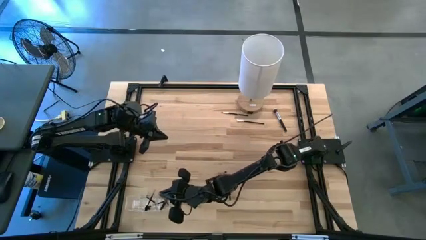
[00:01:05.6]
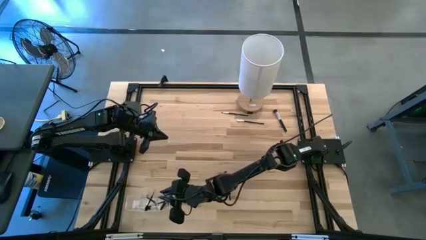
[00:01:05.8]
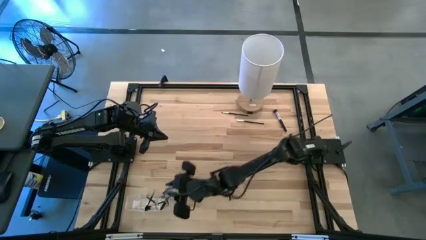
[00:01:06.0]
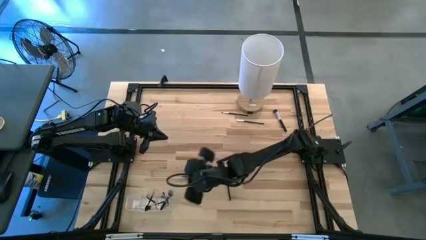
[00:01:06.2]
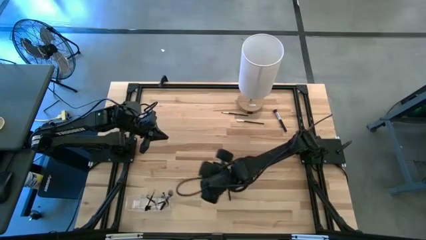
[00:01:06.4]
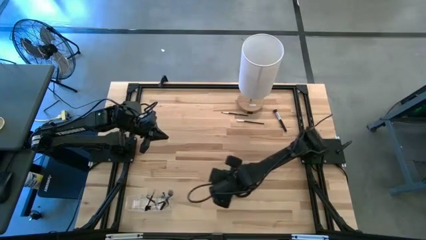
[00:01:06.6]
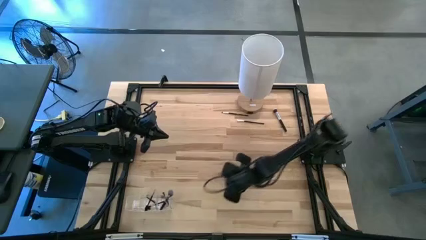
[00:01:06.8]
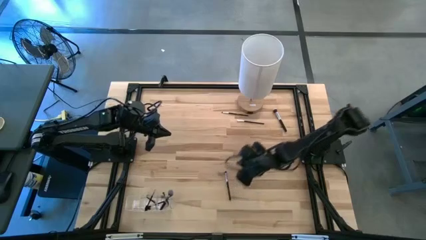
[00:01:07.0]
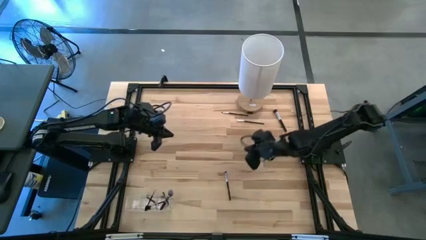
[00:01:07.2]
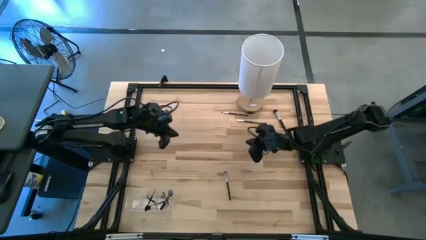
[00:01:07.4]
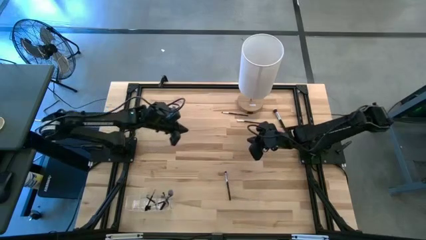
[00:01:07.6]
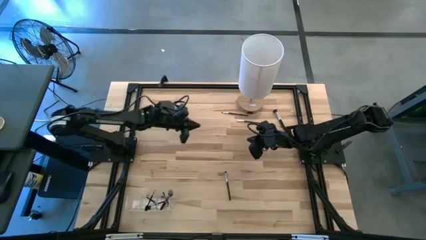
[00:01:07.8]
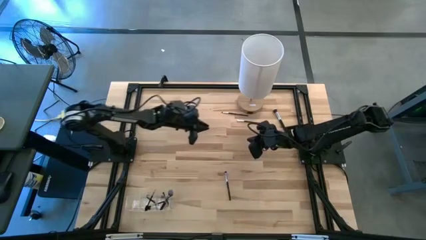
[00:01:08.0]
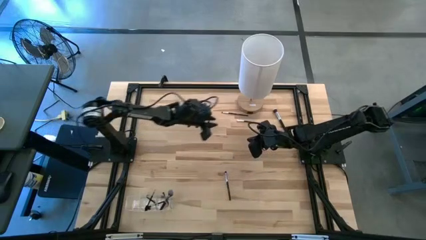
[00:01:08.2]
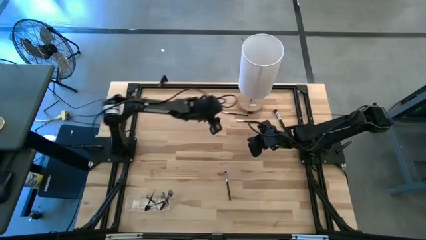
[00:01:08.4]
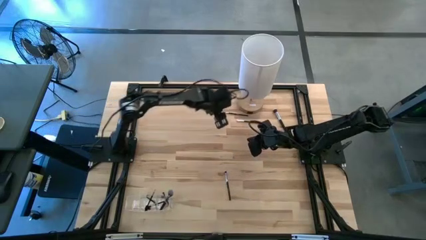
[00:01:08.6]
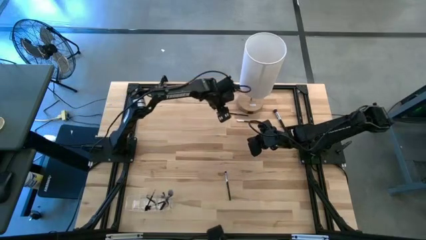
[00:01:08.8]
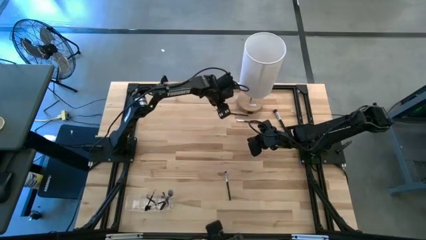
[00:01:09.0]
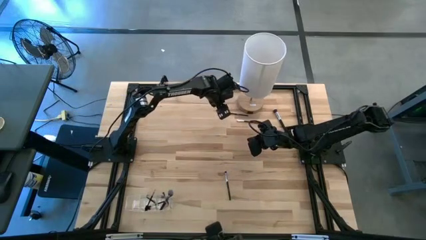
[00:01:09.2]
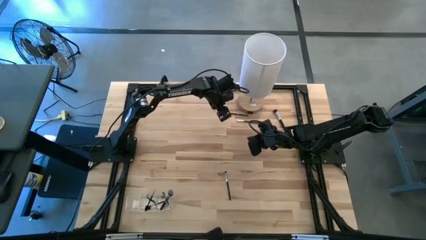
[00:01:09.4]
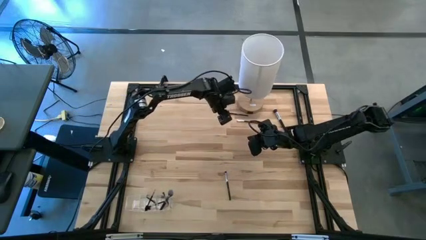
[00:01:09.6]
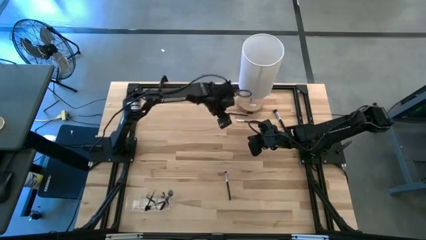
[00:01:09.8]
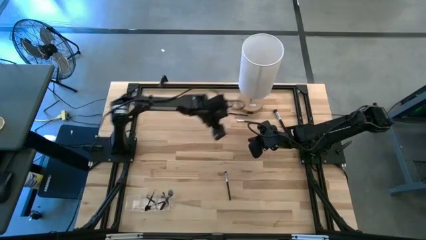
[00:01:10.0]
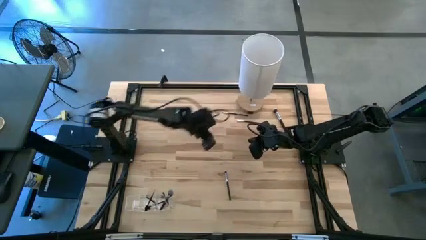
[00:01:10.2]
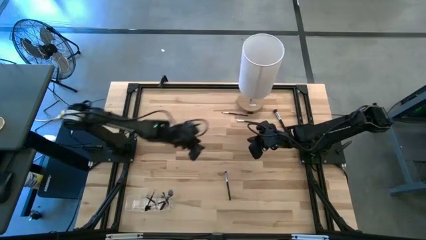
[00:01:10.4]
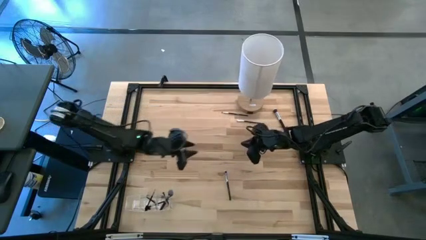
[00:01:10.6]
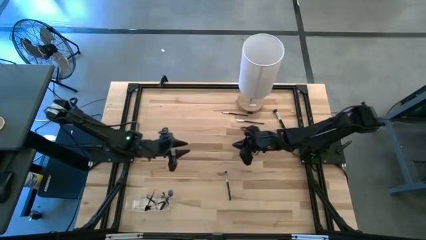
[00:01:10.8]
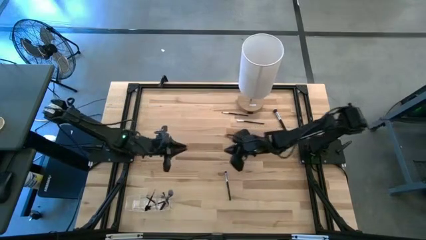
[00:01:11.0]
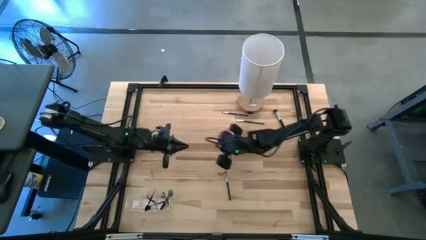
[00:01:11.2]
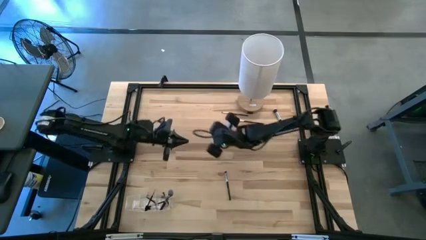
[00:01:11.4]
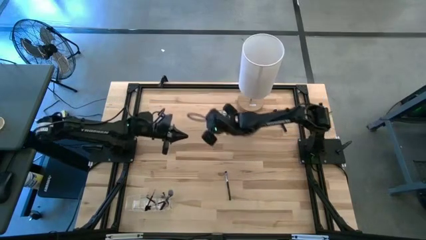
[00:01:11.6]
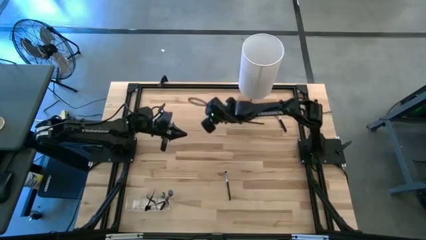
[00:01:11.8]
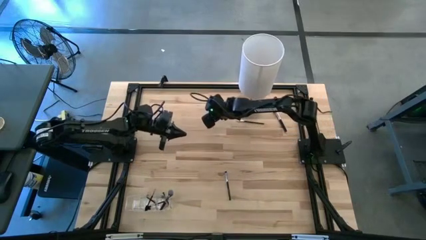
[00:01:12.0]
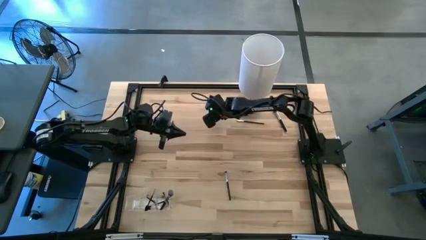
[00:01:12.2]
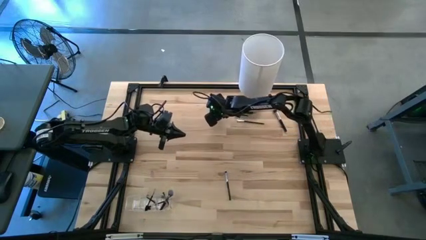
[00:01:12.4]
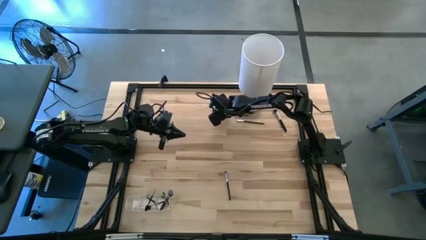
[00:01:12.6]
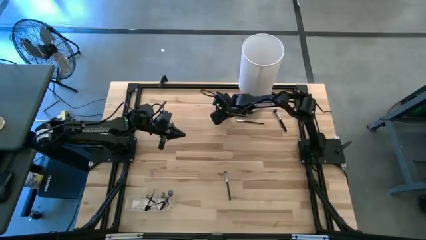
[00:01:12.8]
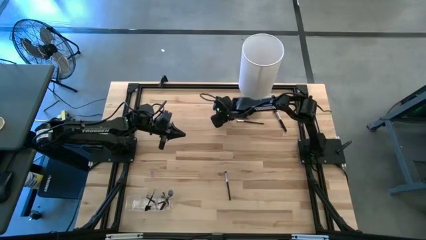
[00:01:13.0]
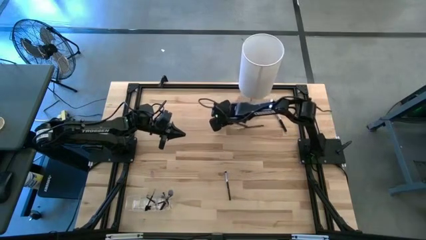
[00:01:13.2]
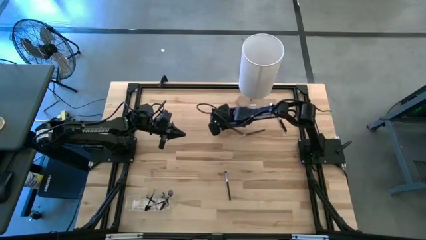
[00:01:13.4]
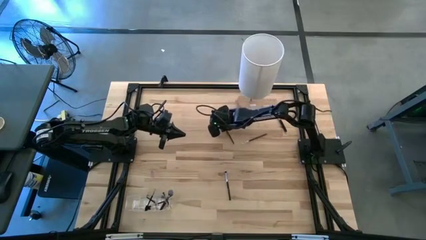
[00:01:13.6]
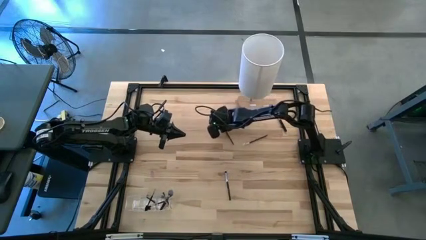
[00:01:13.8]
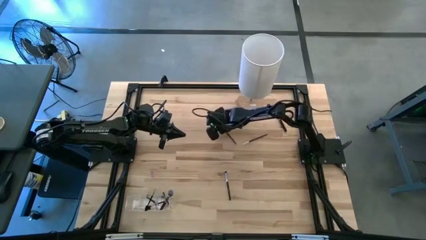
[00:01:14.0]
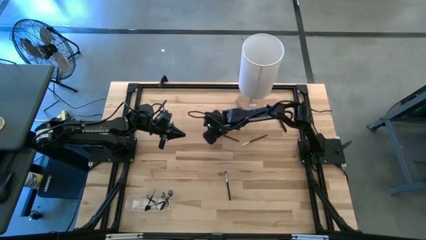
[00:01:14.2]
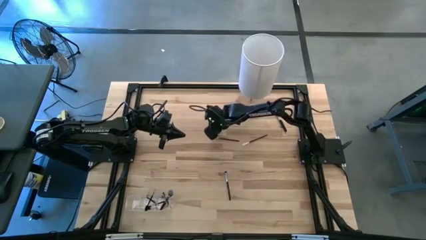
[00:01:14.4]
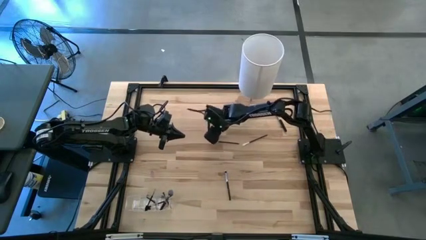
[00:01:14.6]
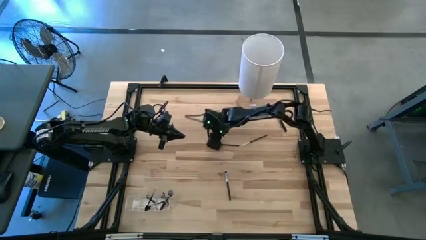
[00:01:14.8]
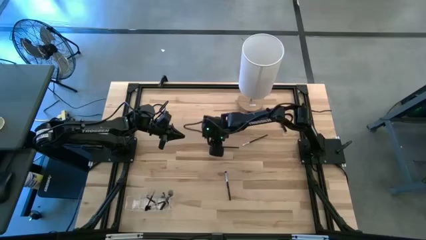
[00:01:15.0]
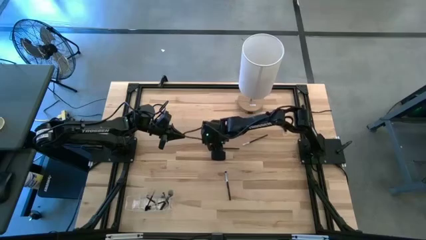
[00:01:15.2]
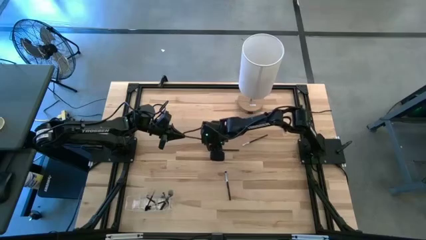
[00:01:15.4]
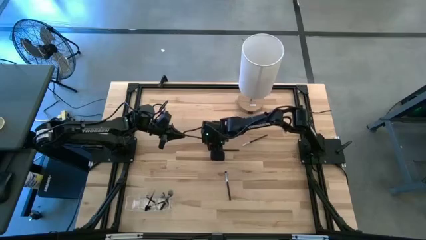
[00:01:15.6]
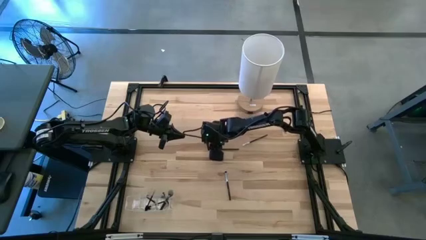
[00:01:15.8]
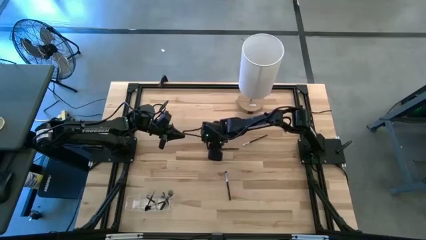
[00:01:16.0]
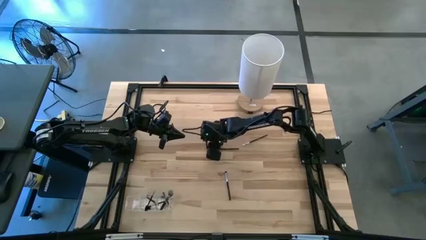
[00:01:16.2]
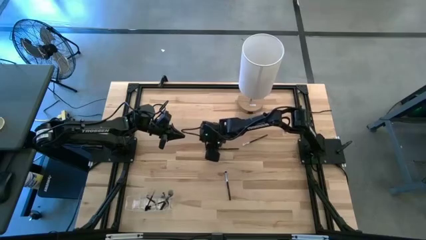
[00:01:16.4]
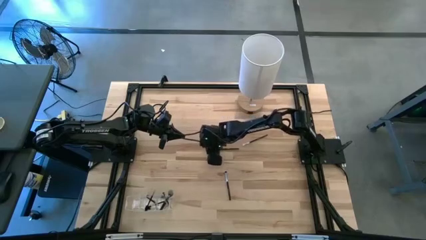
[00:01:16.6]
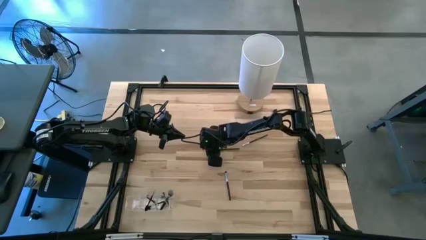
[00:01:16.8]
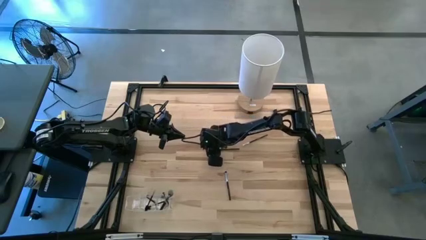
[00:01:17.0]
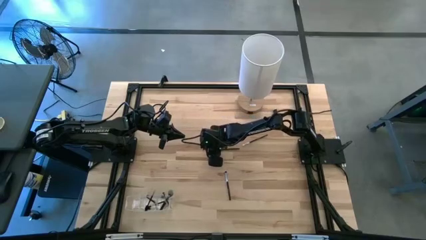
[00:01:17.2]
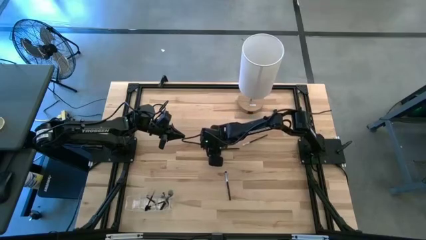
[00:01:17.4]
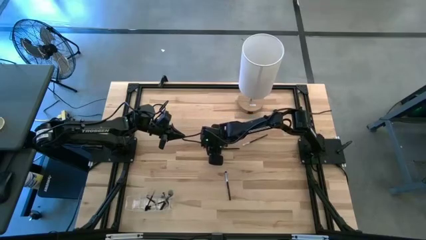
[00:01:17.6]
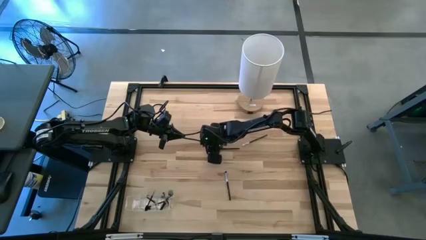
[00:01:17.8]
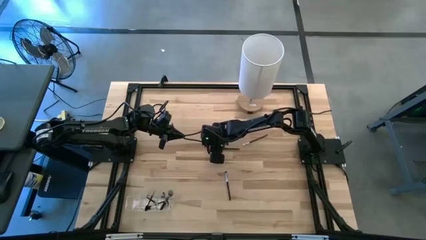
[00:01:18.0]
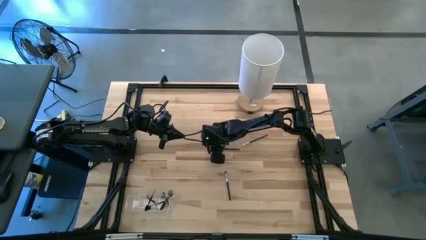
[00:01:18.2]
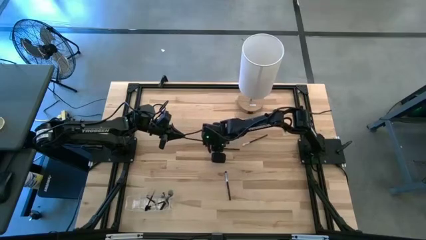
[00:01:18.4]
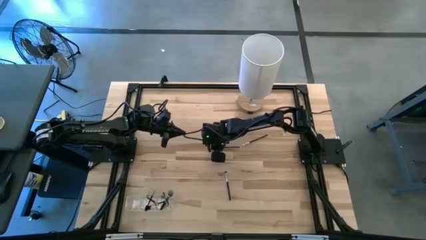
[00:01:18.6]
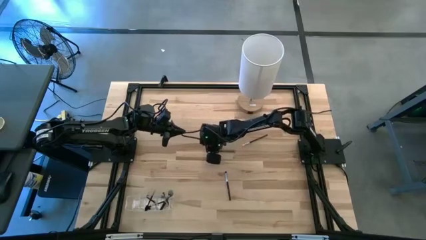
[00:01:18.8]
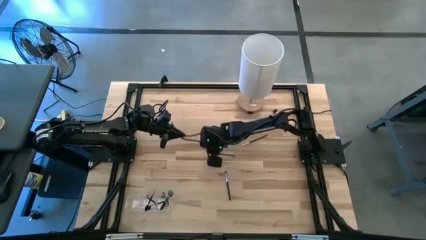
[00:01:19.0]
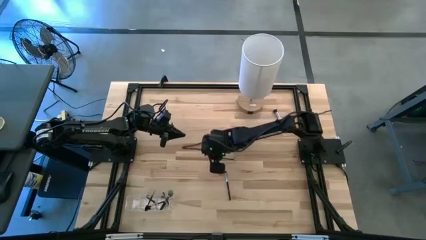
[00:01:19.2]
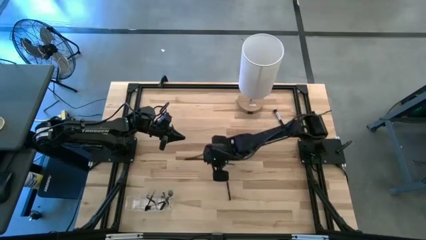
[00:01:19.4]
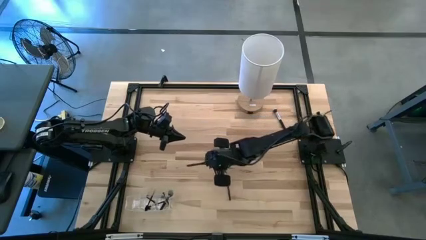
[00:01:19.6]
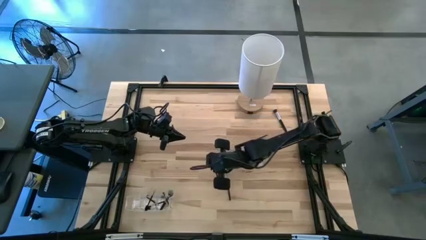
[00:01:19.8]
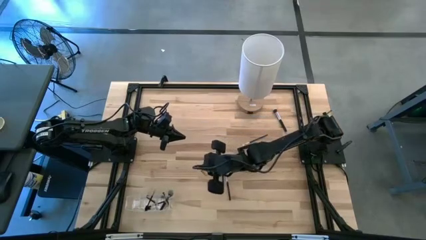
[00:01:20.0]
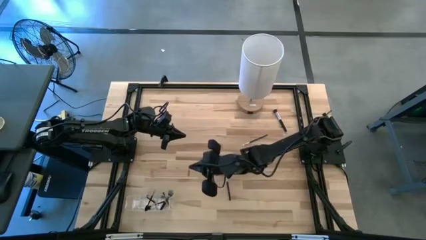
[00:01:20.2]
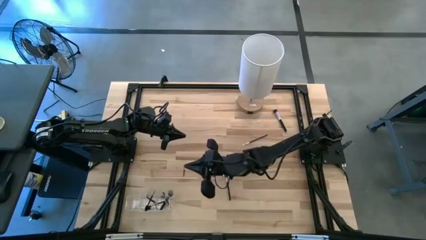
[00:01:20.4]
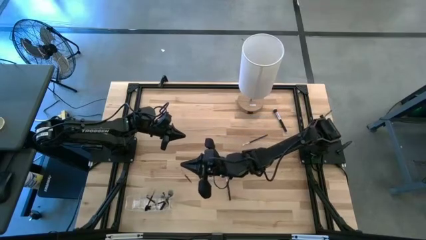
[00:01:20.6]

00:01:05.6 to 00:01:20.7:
Task: Put items in baskets/containers
Put the eyeshadow brush into the transparent organizer

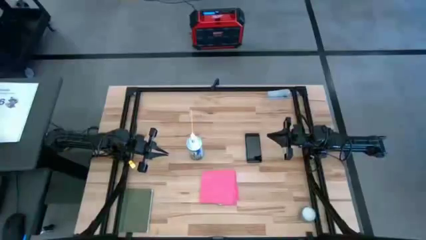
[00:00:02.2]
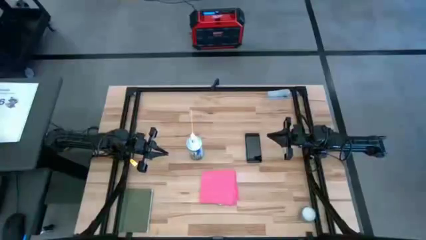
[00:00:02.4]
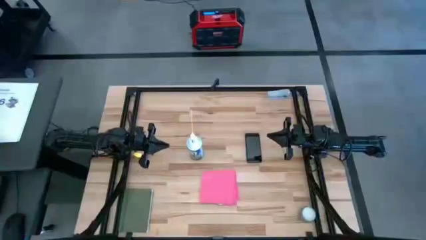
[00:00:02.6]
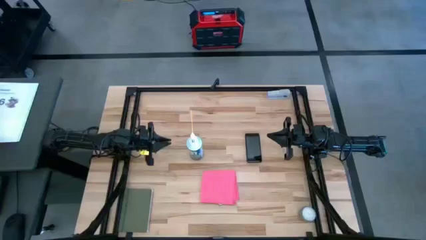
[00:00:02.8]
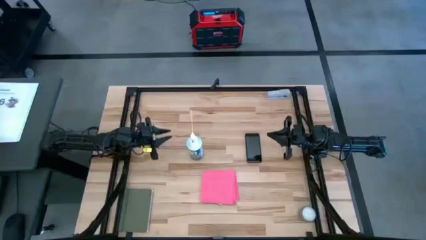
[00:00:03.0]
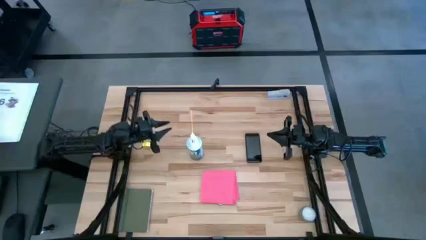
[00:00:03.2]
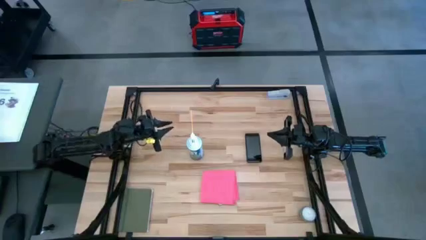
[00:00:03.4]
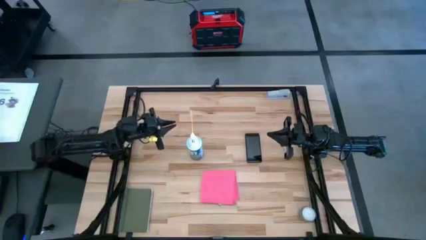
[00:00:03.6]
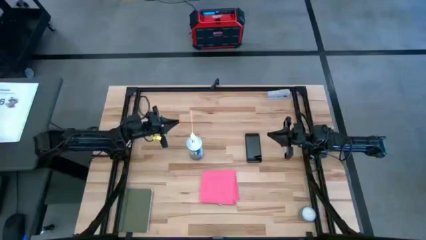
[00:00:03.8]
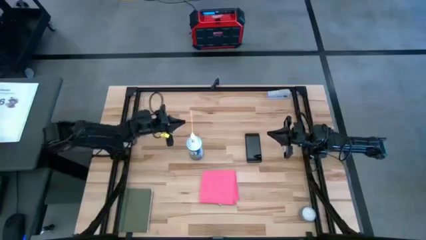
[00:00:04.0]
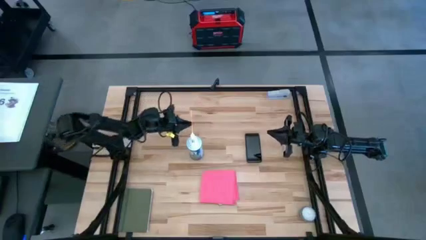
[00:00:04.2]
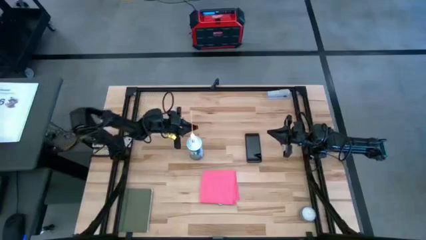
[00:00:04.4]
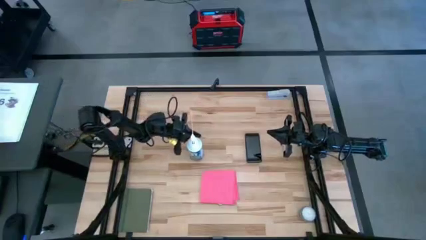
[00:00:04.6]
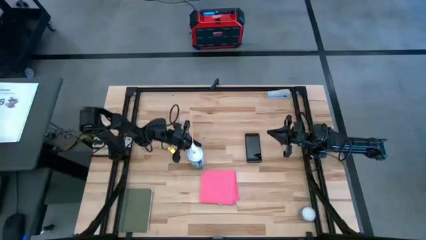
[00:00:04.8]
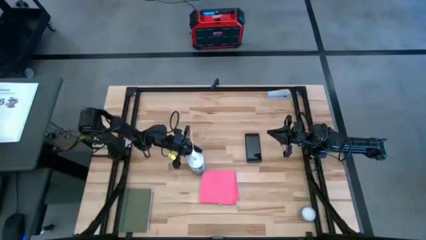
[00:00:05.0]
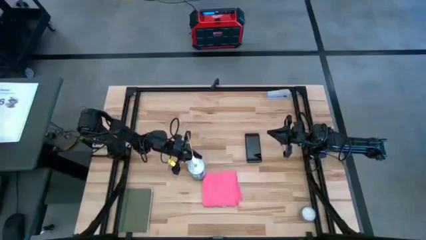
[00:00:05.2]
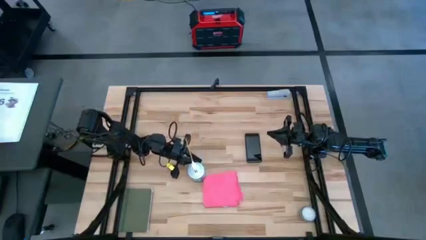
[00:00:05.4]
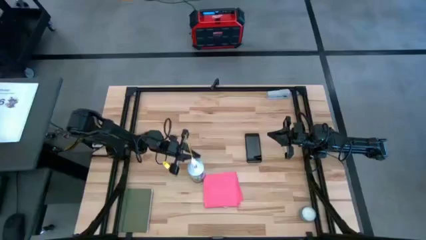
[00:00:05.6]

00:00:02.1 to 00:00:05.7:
Task: Apply microfiber cloth
Adjust the white spray bottle
